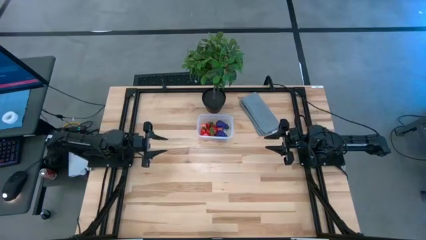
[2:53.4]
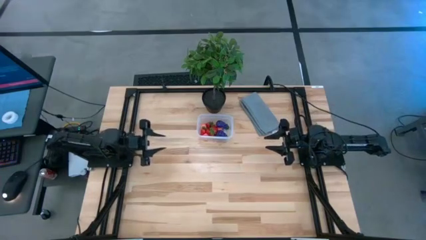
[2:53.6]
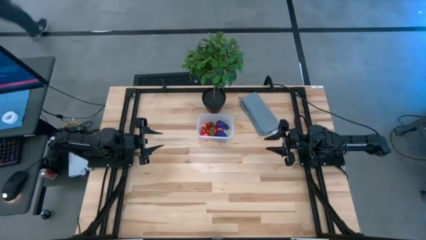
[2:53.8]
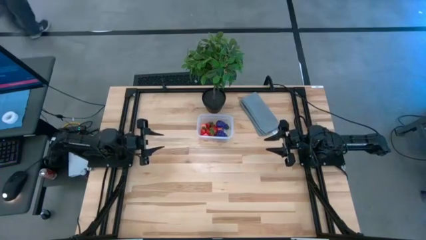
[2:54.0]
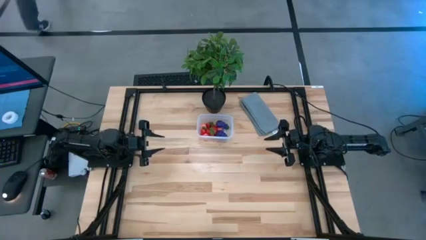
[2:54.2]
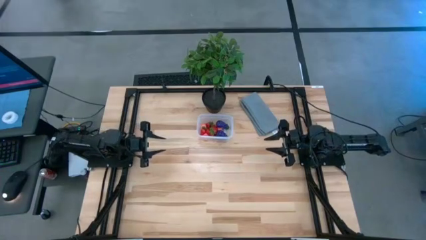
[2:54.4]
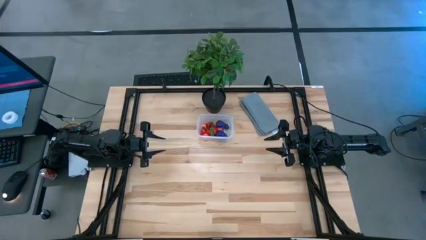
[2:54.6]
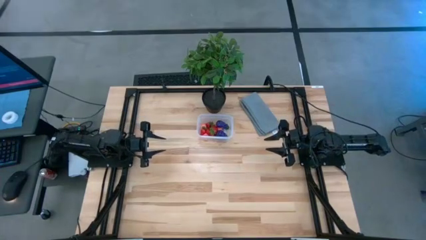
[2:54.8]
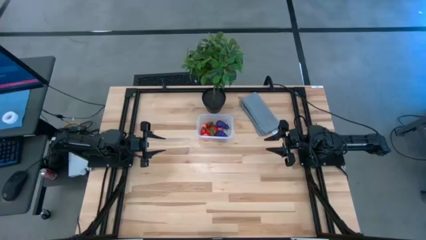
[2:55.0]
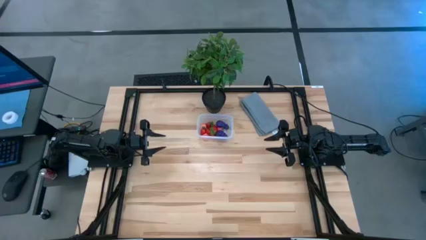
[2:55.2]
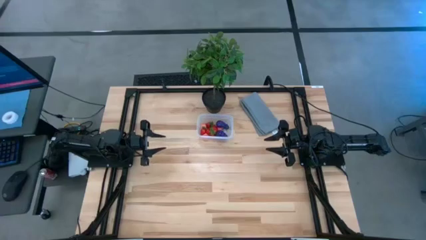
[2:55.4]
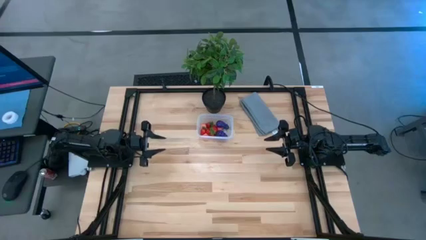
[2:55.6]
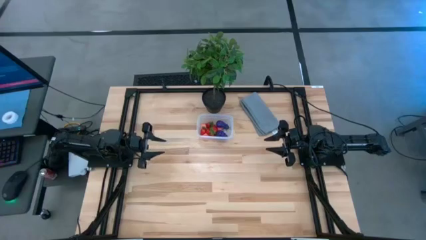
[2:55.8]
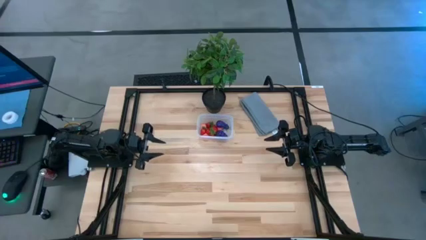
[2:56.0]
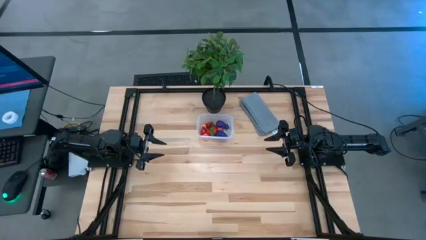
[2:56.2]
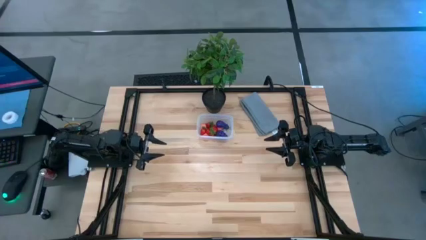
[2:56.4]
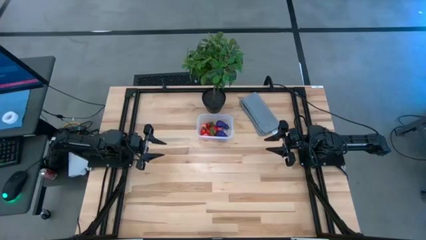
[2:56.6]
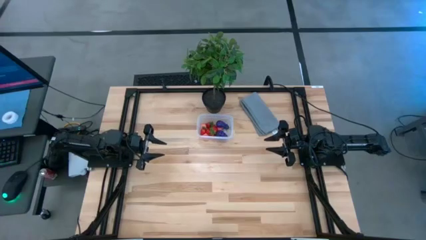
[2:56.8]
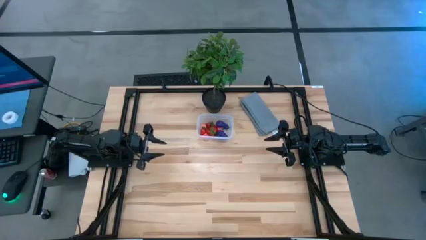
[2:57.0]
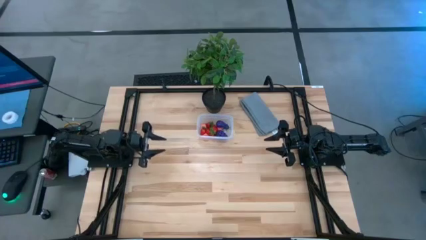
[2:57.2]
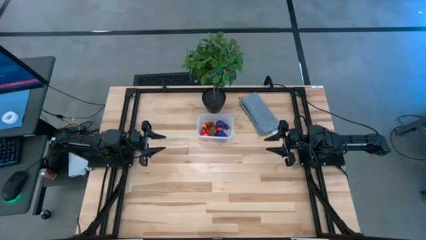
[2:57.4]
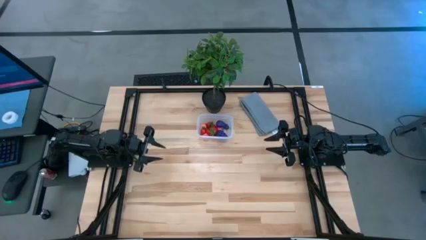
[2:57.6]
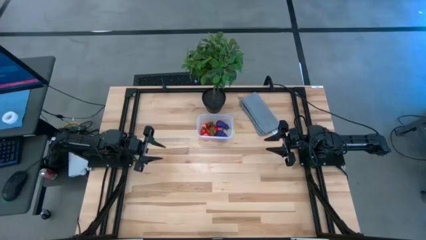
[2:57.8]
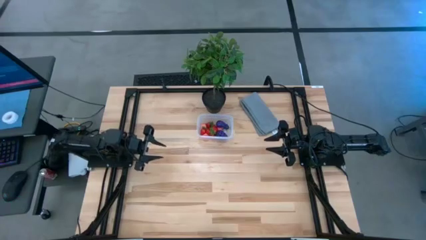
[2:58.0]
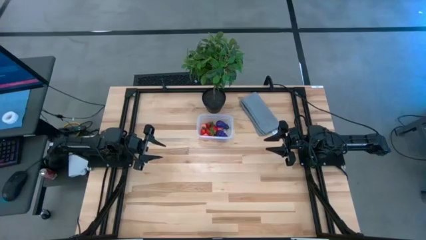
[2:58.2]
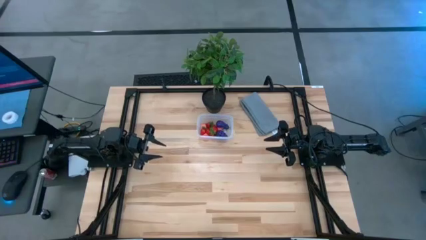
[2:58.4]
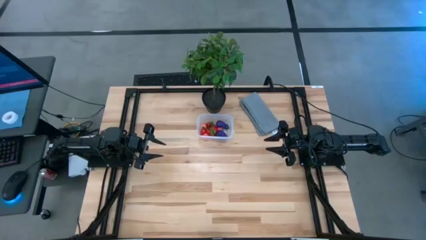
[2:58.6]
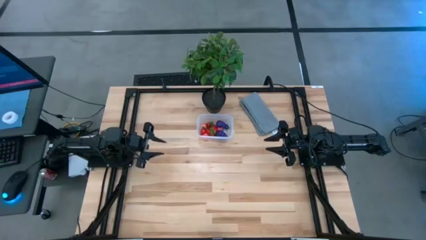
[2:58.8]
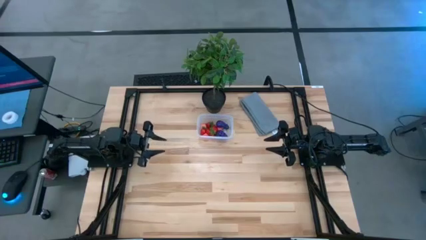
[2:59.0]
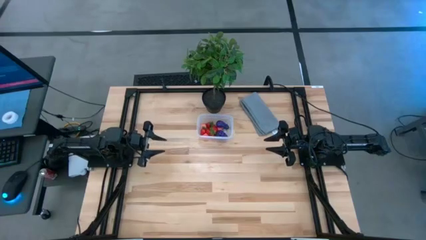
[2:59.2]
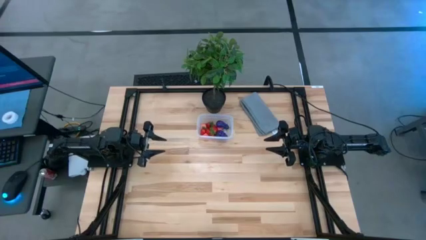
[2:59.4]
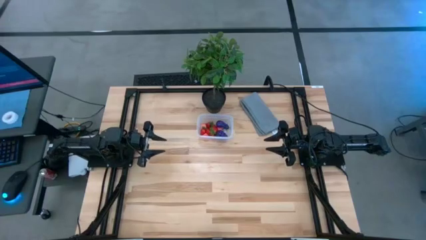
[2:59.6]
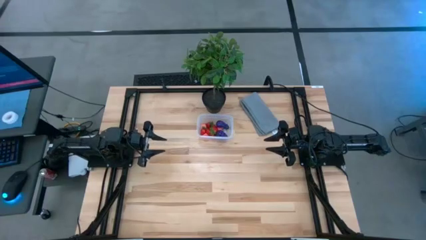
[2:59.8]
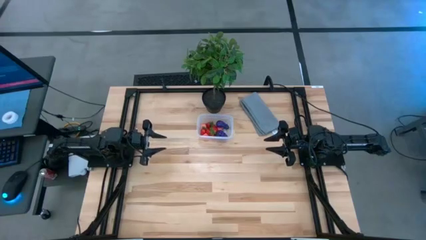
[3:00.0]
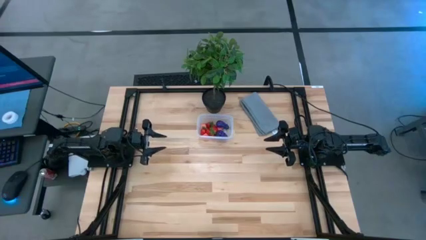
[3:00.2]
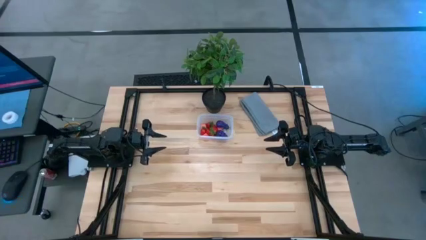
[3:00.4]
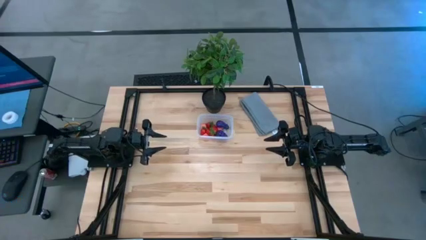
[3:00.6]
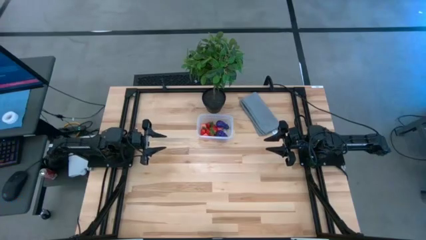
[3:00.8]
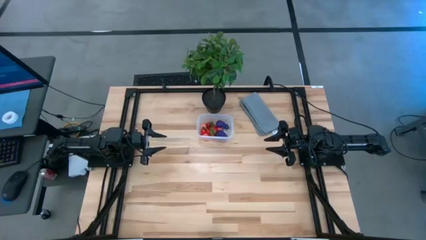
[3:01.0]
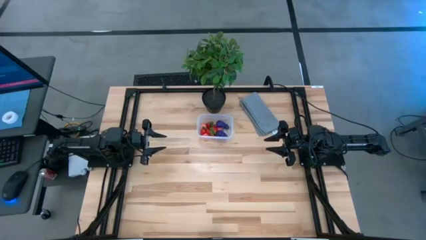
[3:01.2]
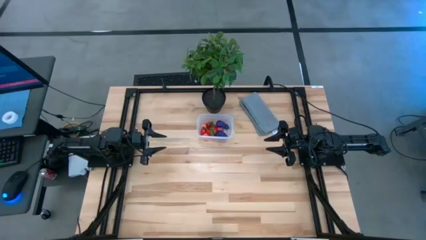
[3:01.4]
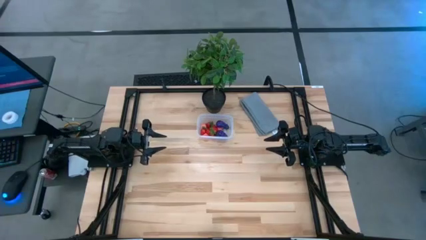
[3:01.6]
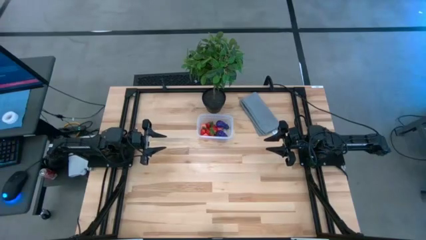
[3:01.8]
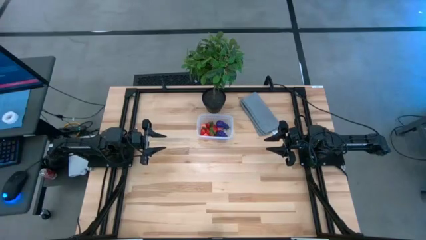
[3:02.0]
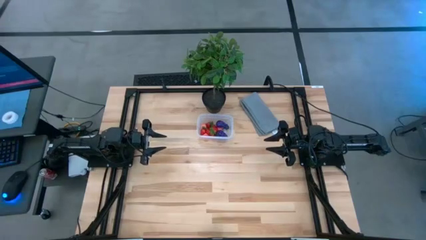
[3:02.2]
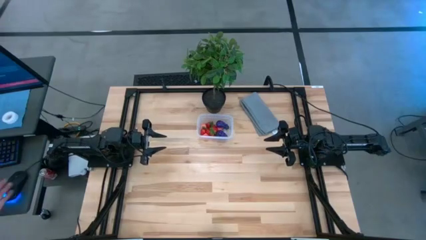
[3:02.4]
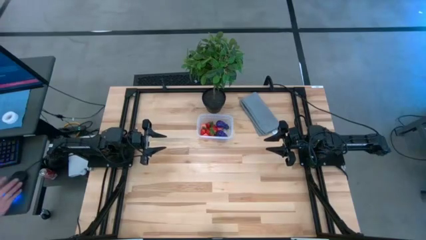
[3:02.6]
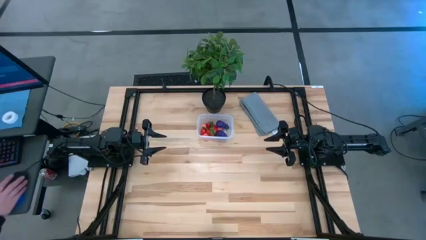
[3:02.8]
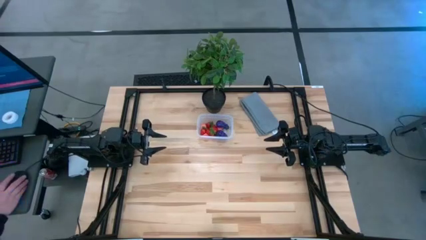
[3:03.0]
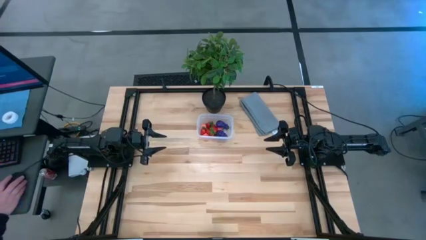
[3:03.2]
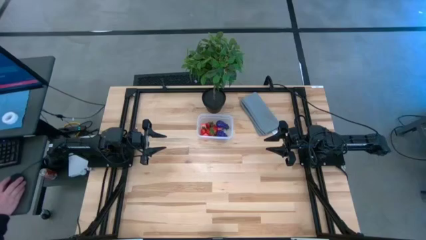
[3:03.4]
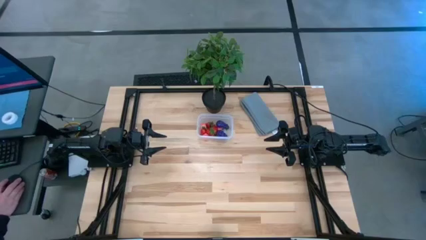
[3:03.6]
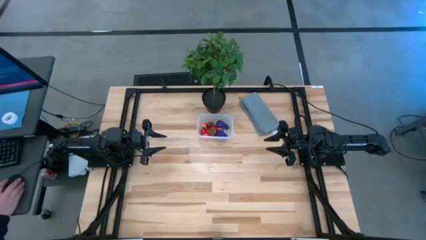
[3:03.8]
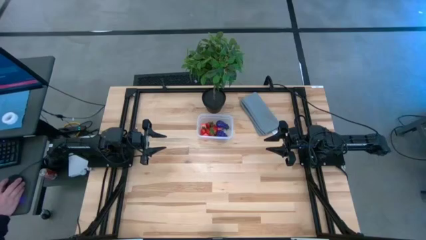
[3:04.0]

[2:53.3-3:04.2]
Task: Pick and placing Produce into tupperware
Return to Home Position
